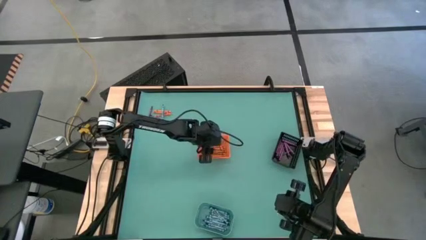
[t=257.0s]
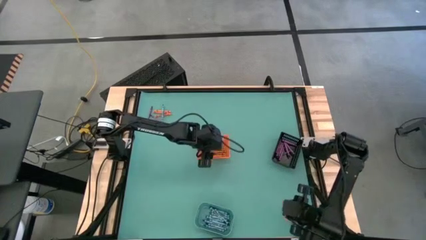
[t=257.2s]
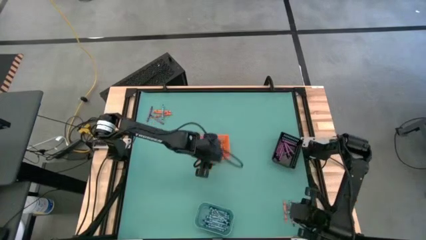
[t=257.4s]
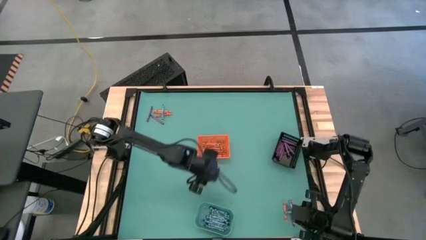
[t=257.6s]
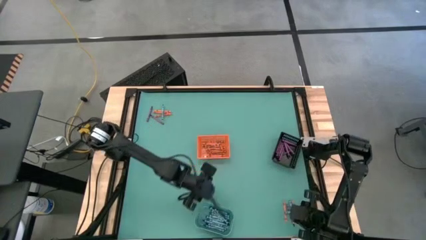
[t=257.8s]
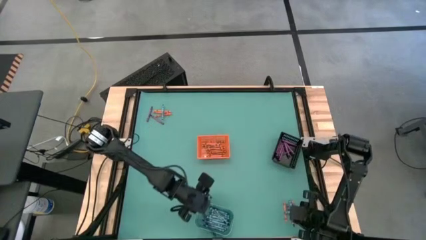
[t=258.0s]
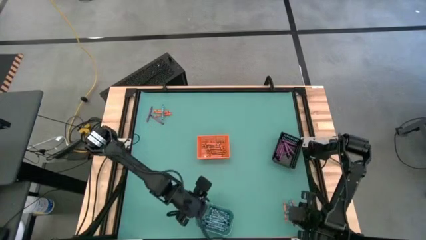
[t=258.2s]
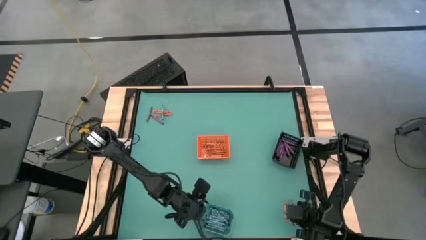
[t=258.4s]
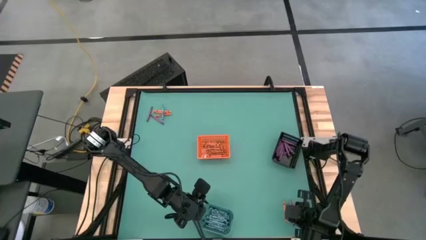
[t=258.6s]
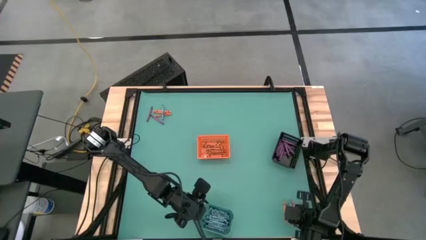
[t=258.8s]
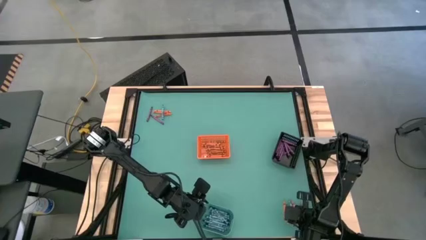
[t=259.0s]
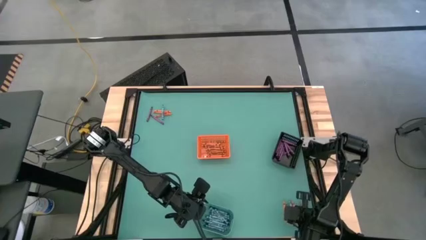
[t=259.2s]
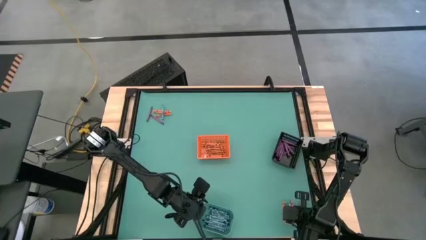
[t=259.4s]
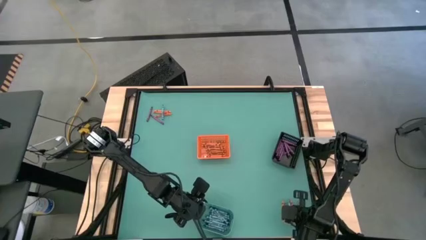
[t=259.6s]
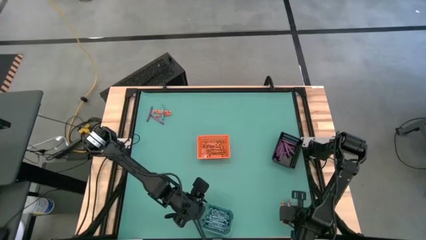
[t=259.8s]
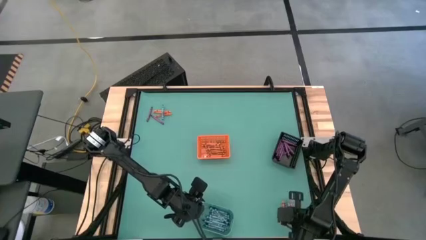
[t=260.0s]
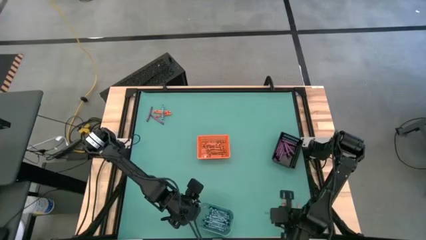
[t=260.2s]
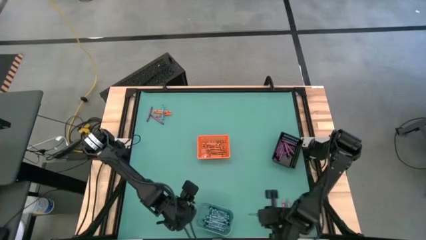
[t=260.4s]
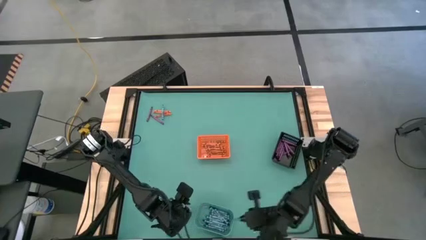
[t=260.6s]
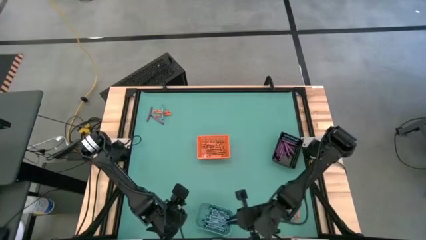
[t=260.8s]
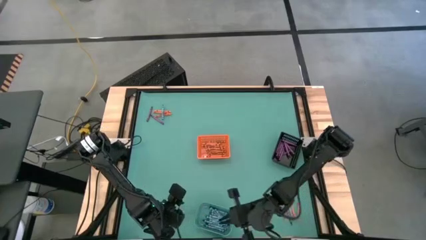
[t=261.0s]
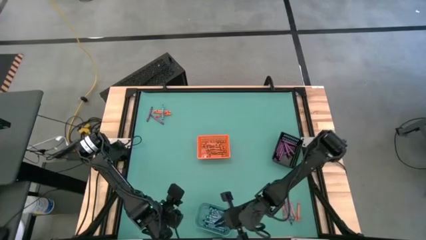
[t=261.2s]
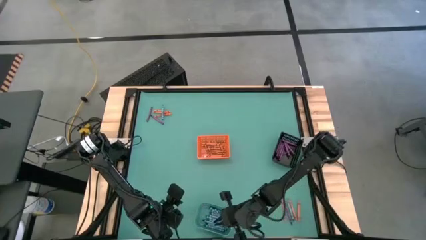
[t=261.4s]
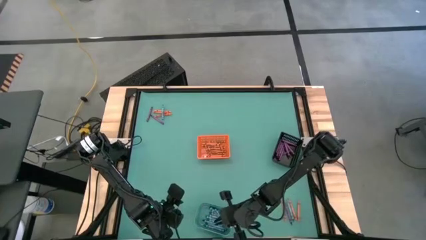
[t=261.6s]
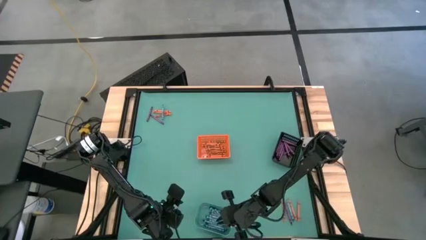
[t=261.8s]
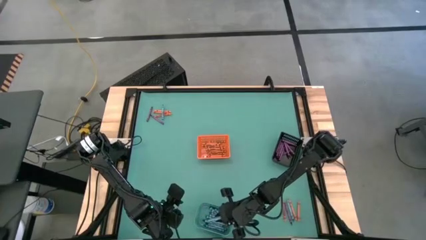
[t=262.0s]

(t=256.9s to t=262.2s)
Task: Sort crayons
Put the blue crayon into the blue bin

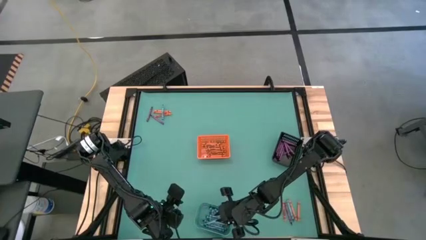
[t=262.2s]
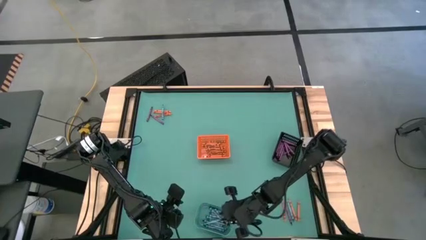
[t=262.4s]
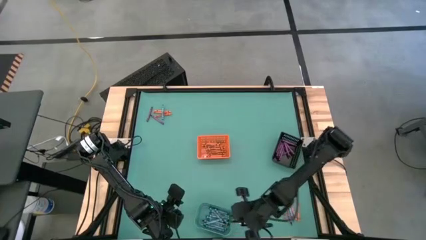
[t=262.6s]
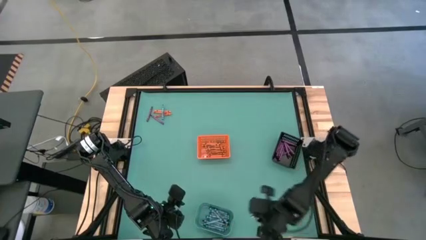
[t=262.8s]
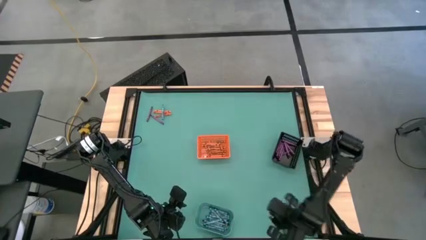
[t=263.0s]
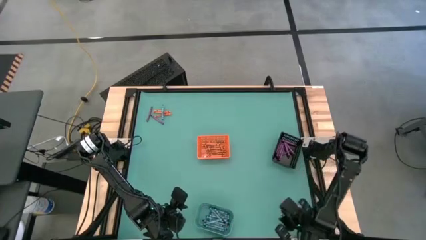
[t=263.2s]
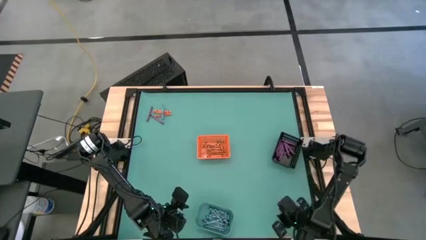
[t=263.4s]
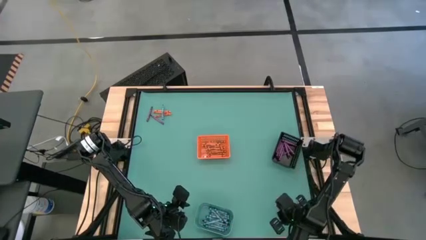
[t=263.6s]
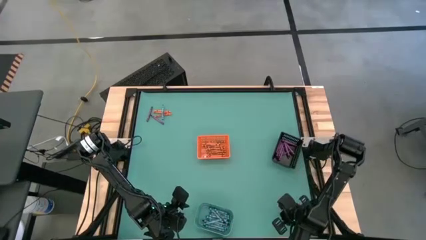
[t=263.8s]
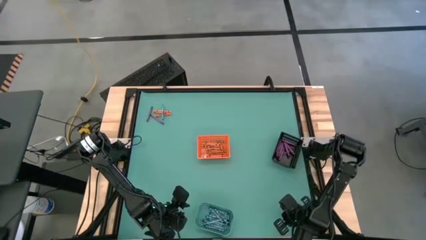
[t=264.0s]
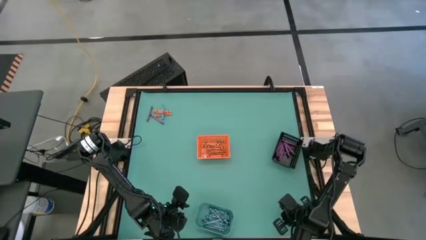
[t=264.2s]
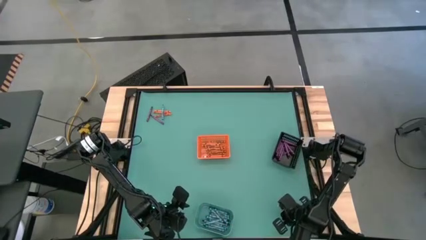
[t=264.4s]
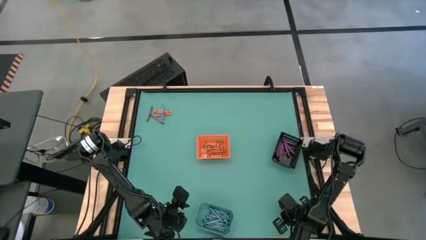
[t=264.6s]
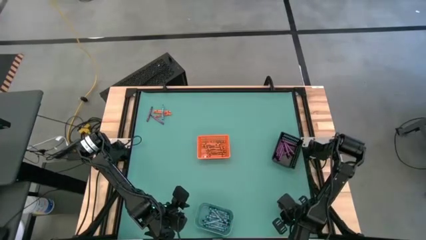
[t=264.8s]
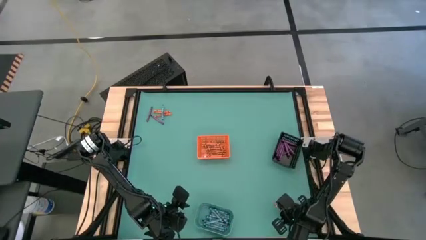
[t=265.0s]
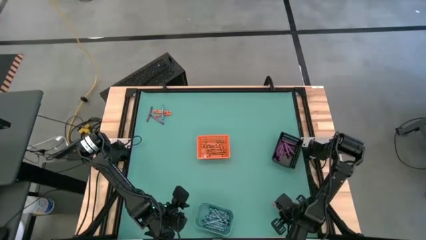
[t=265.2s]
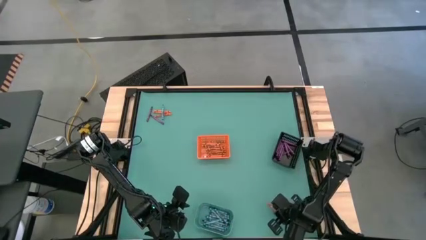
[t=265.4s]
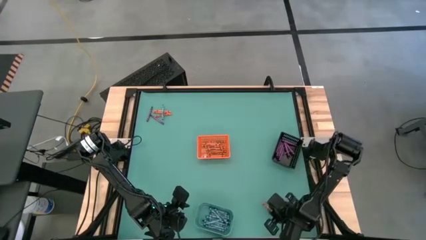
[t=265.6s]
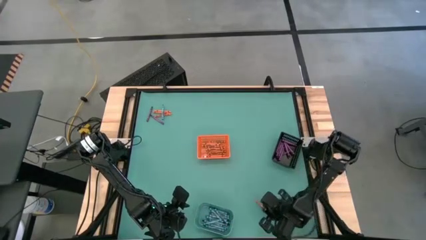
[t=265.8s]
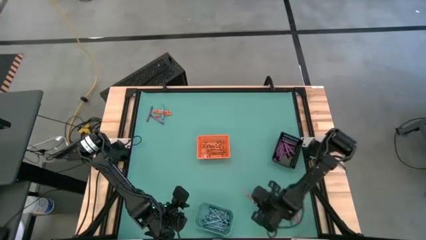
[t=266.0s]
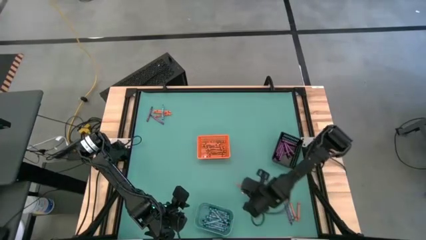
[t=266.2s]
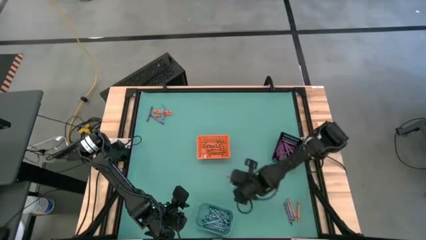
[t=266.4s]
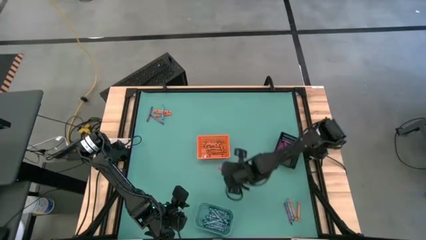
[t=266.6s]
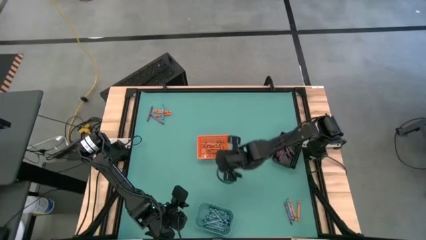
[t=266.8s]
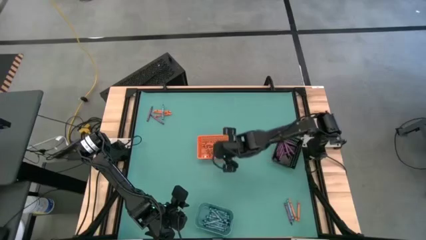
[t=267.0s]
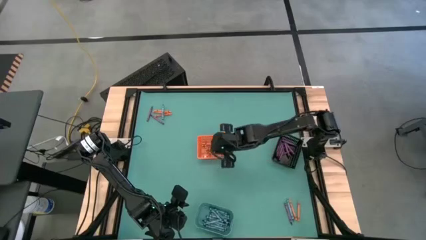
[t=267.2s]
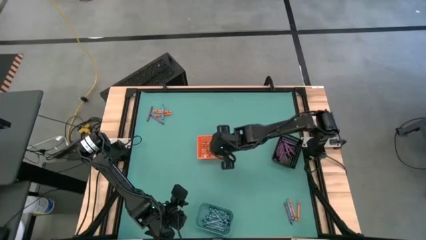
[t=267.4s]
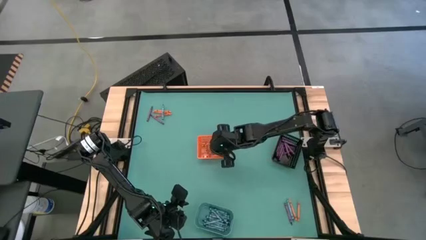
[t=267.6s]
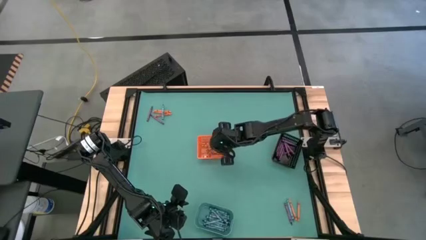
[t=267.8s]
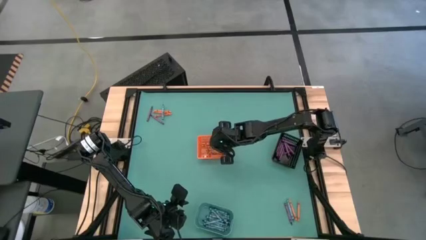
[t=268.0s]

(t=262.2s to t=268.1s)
Put the orange crayon into the orange bin

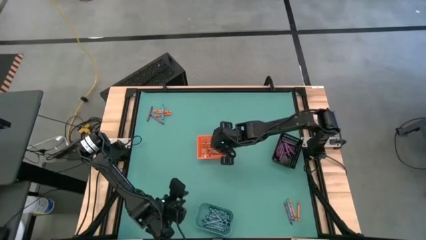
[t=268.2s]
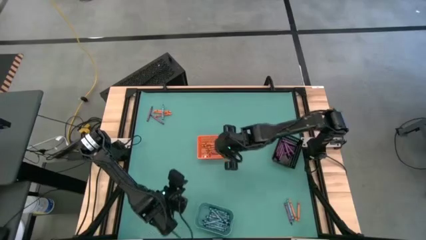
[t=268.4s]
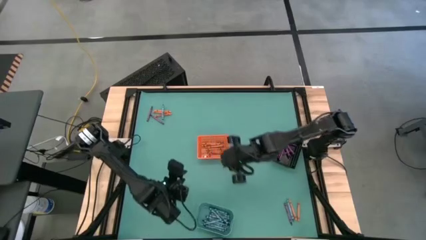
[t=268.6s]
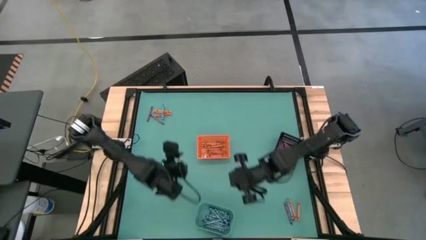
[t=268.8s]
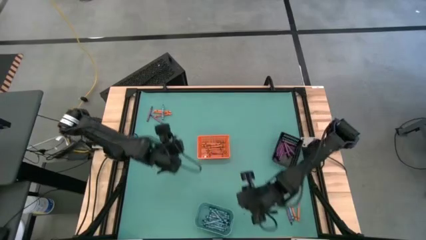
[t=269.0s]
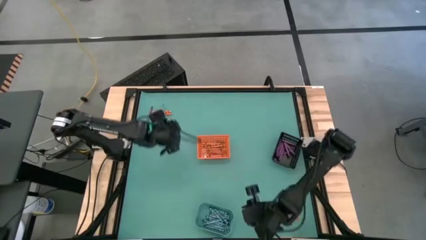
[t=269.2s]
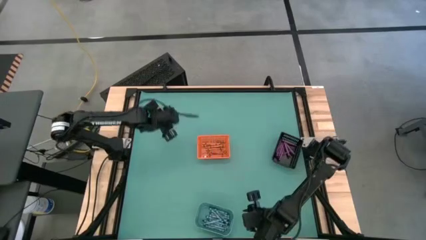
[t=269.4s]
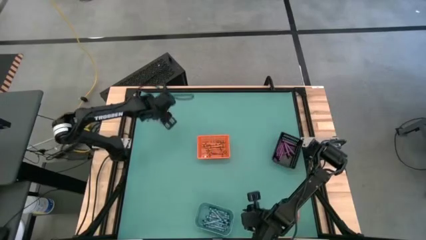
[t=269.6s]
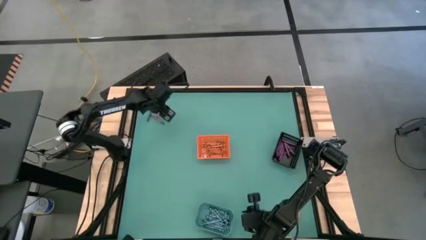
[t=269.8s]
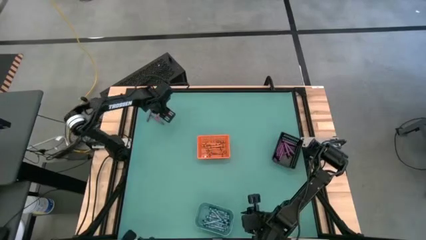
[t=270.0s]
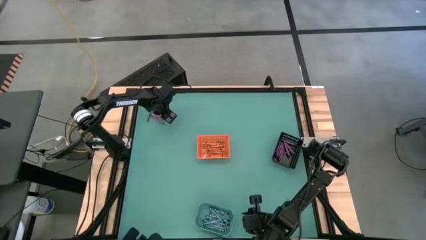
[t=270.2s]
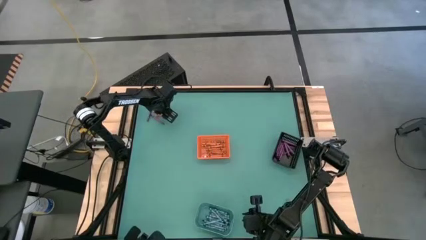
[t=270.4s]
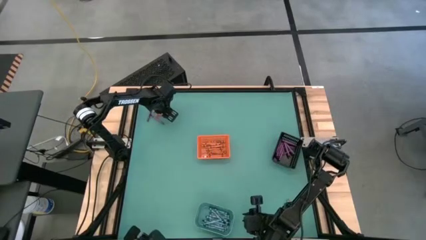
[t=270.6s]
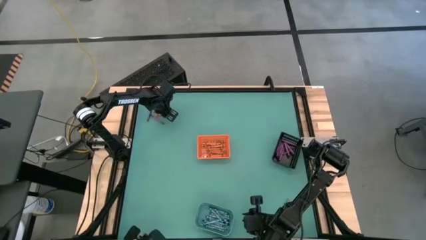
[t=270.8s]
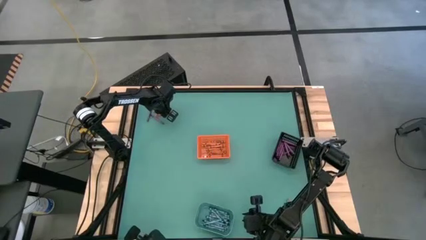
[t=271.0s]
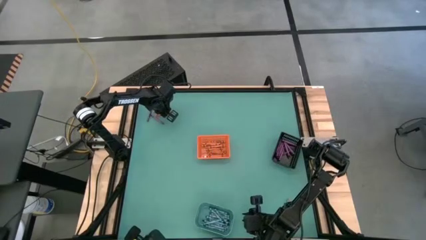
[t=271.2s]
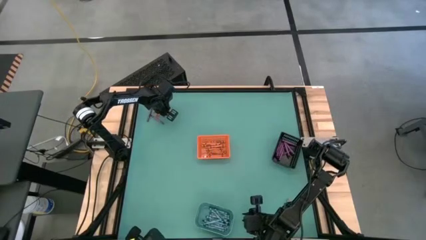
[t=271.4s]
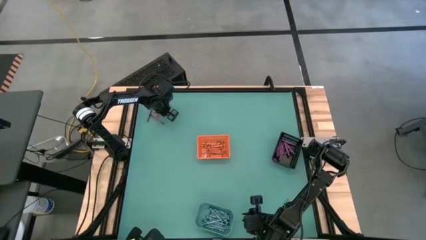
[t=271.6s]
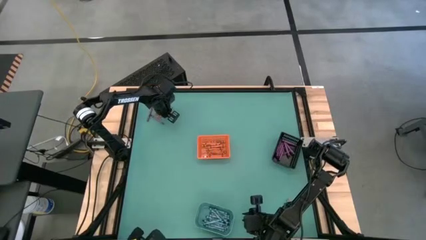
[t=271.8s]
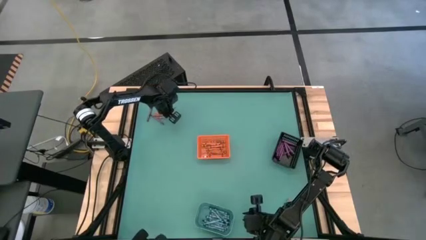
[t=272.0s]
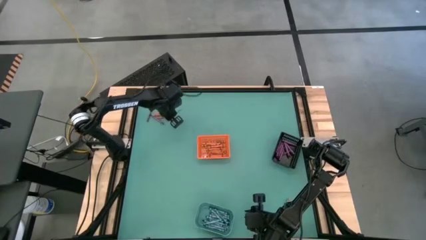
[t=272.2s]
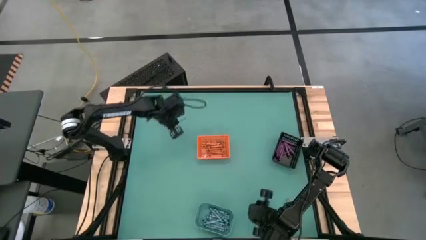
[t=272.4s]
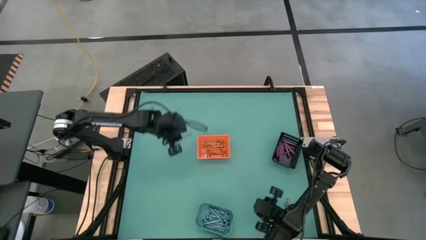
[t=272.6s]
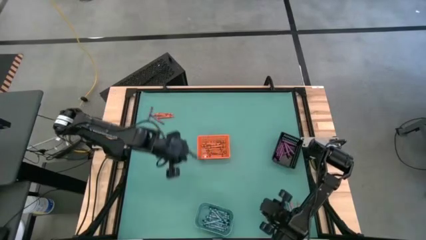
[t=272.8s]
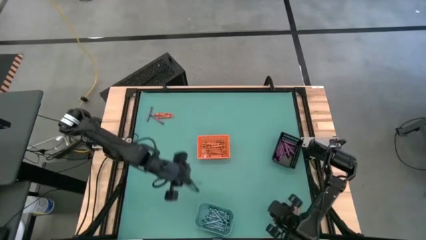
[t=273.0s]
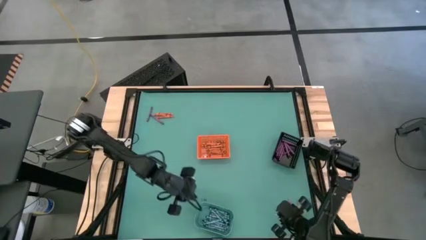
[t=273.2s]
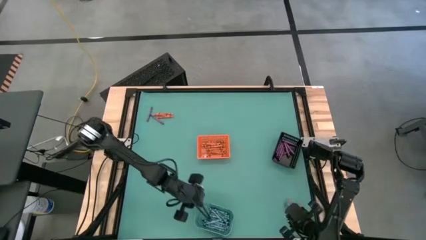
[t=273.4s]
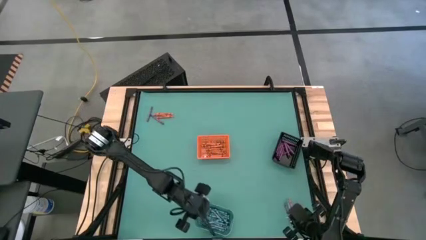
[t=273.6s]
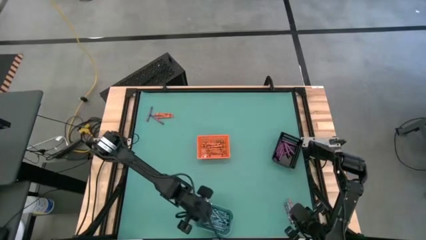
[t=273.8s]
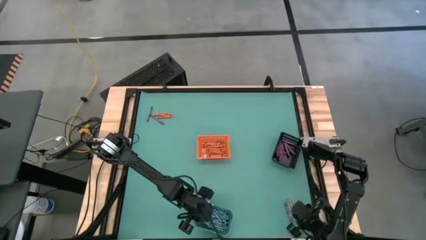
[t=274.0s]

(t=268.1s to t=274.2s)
Put the blue crayon into the blue bin
